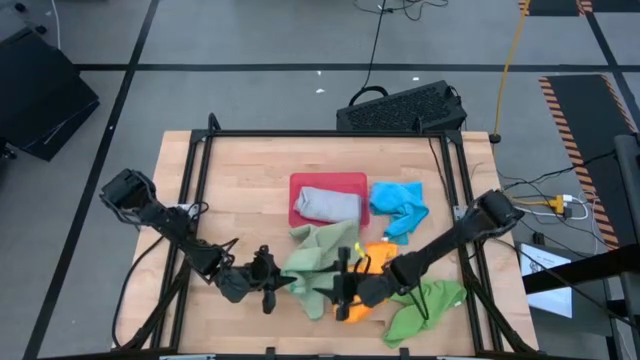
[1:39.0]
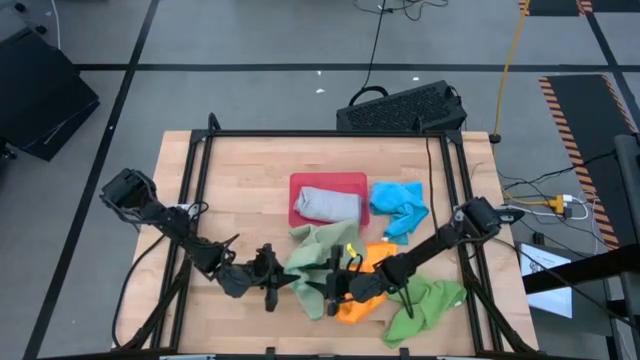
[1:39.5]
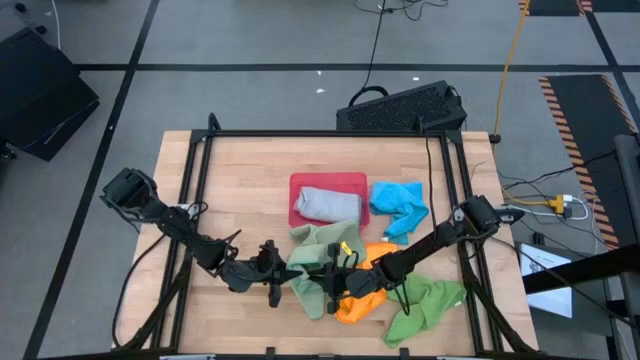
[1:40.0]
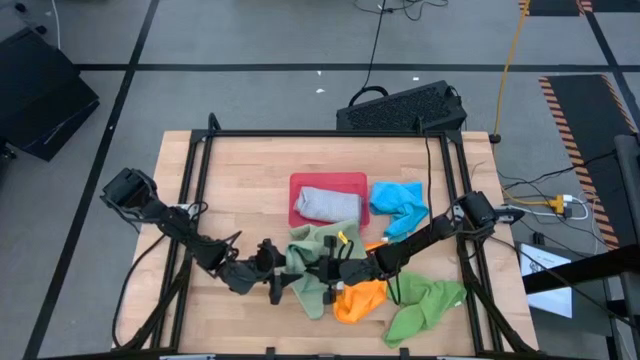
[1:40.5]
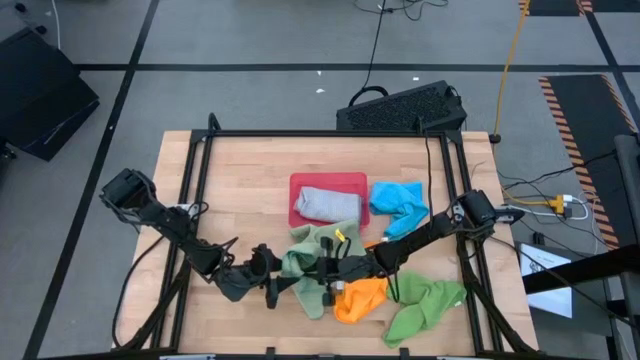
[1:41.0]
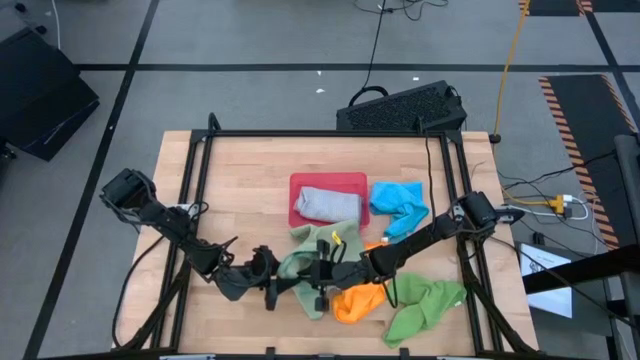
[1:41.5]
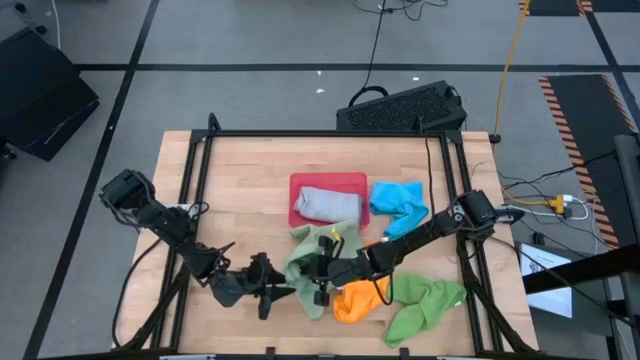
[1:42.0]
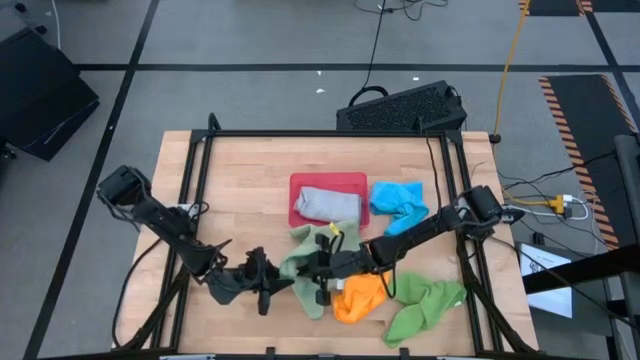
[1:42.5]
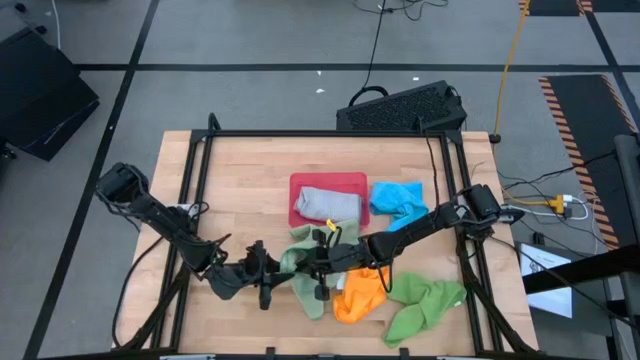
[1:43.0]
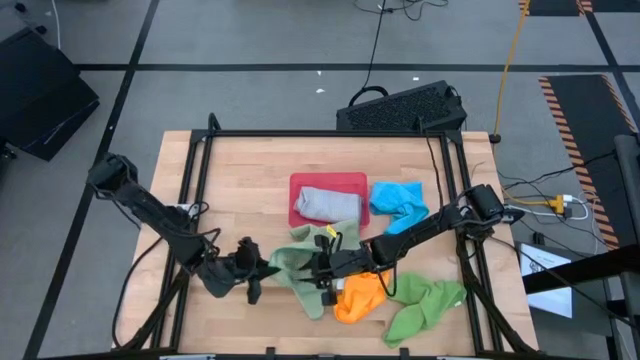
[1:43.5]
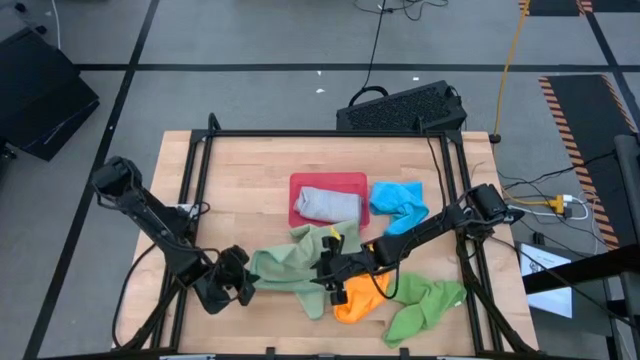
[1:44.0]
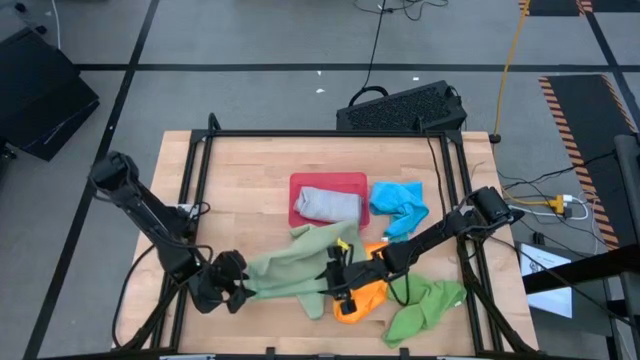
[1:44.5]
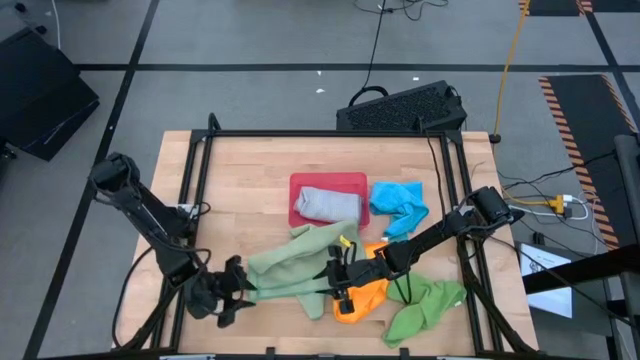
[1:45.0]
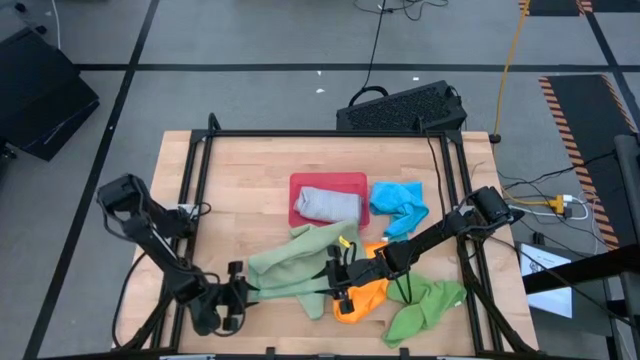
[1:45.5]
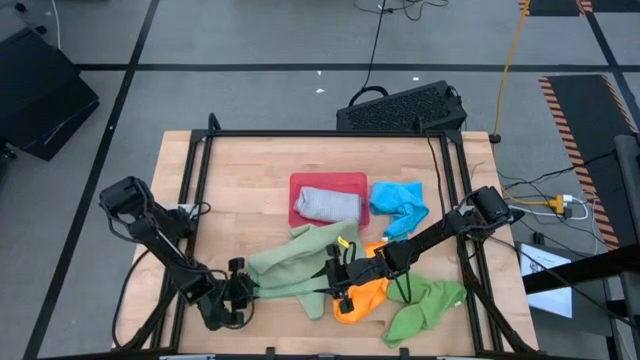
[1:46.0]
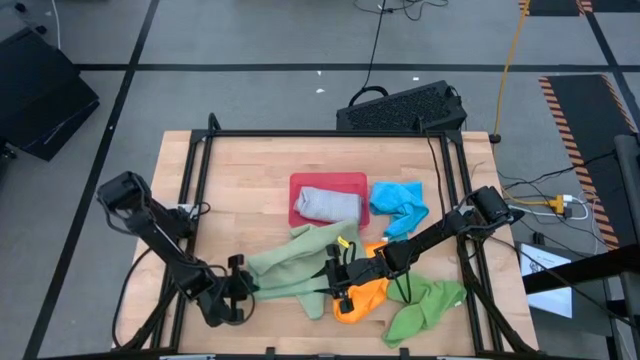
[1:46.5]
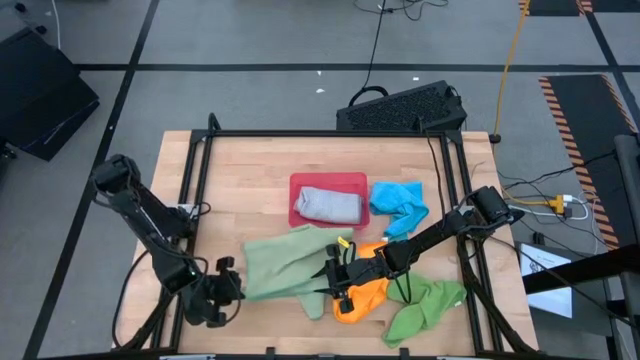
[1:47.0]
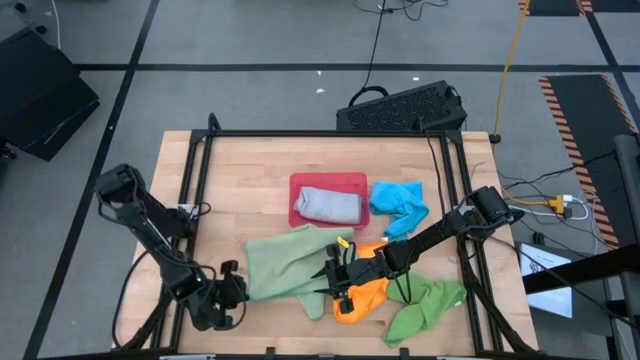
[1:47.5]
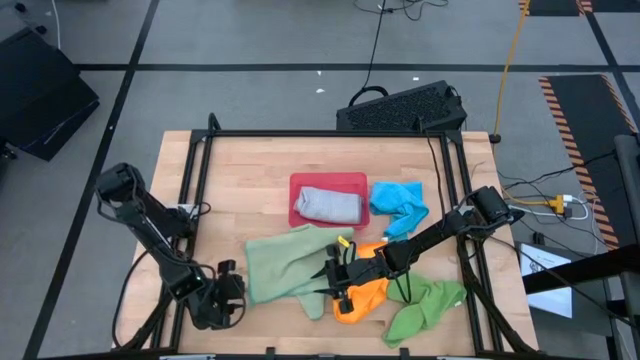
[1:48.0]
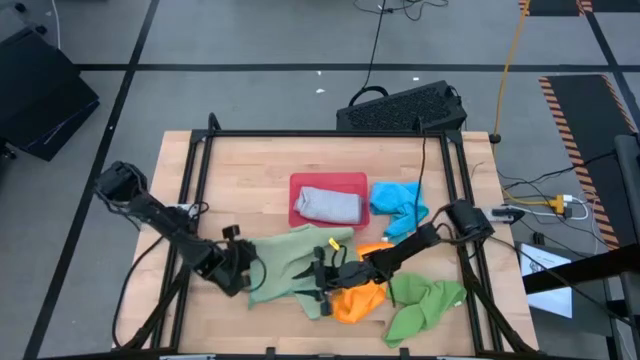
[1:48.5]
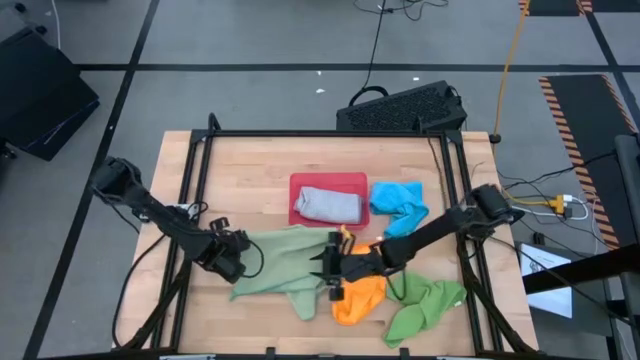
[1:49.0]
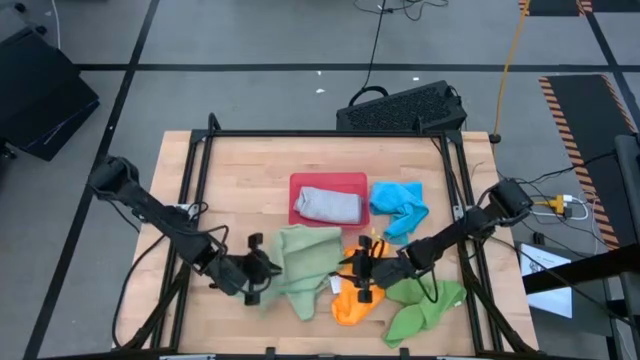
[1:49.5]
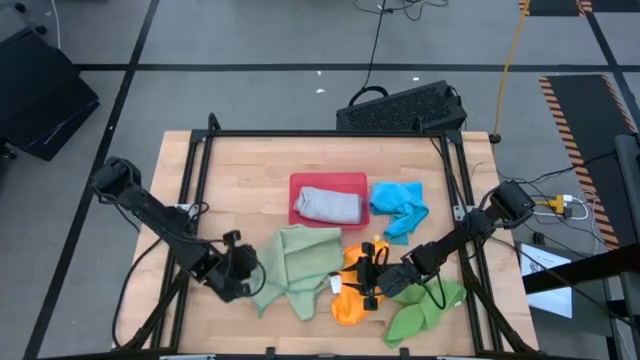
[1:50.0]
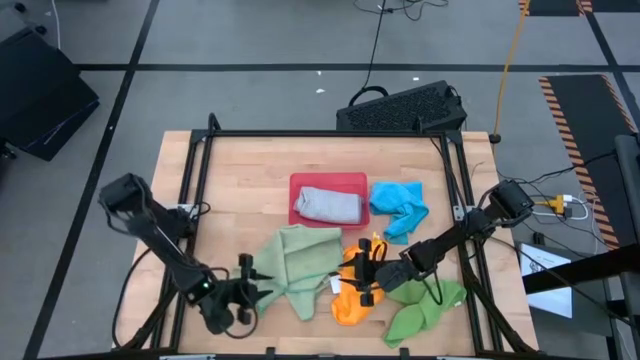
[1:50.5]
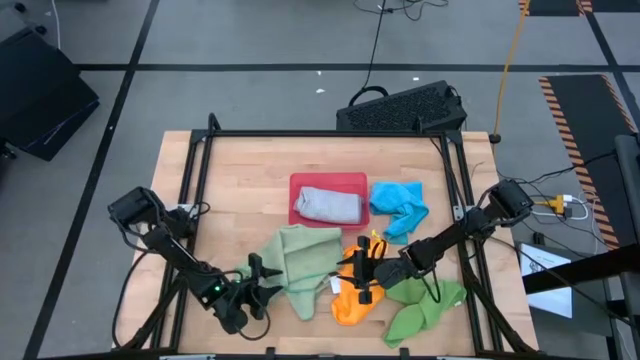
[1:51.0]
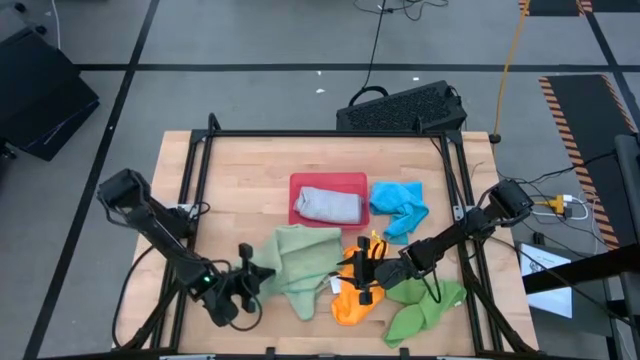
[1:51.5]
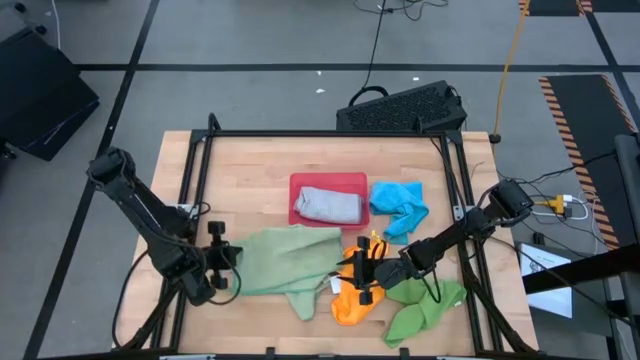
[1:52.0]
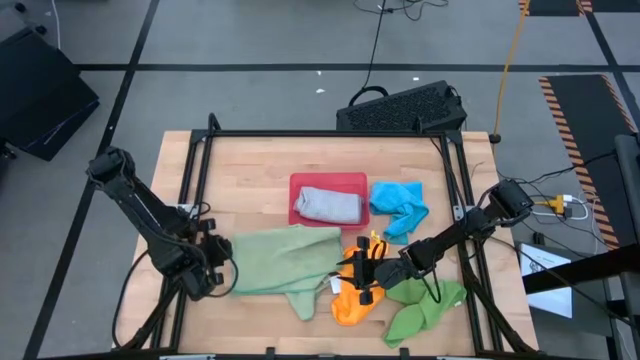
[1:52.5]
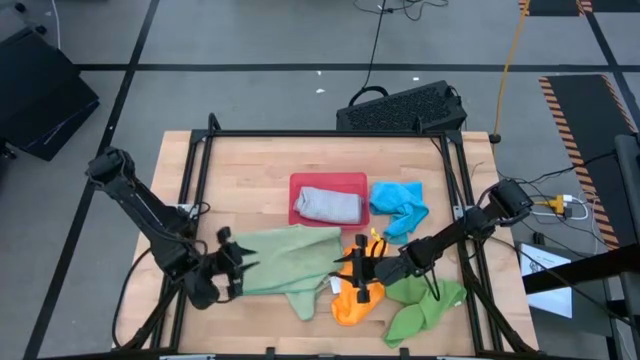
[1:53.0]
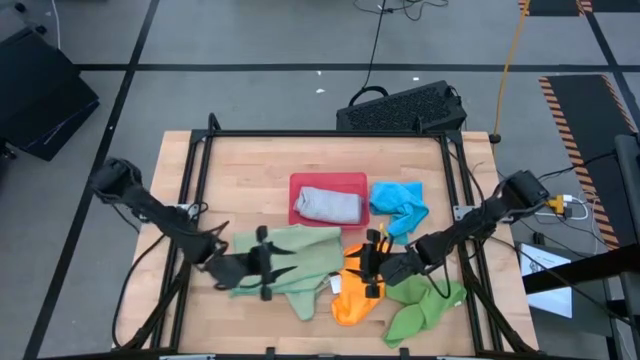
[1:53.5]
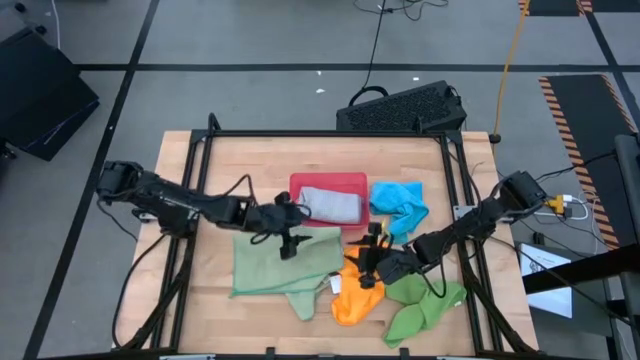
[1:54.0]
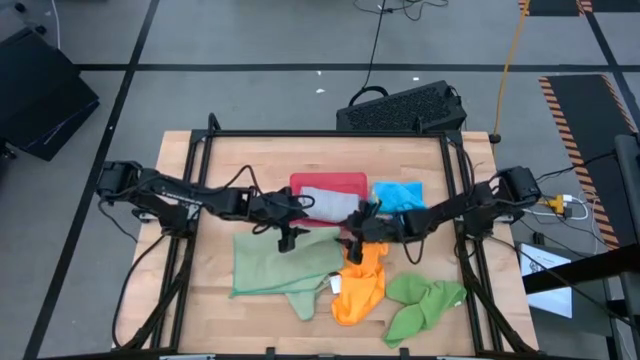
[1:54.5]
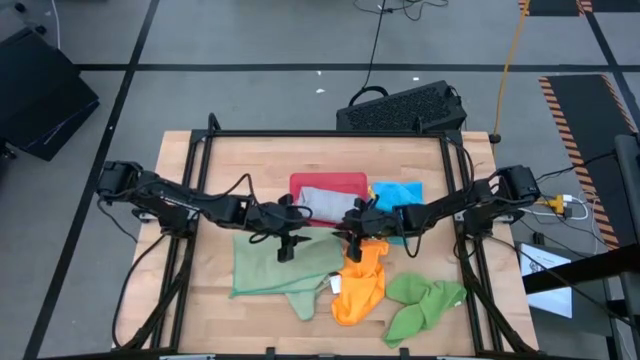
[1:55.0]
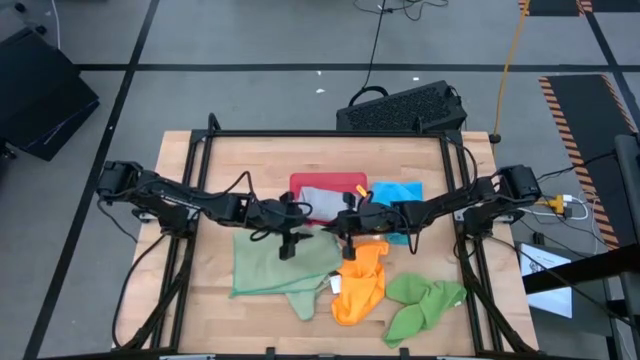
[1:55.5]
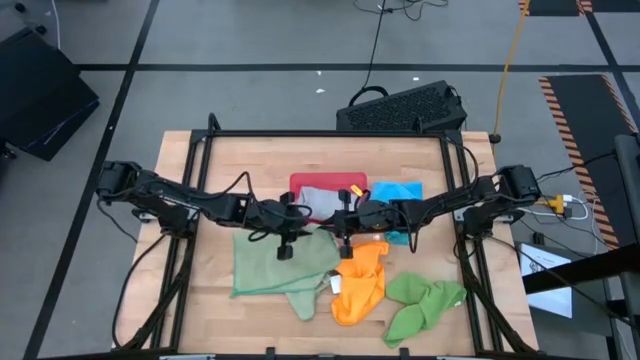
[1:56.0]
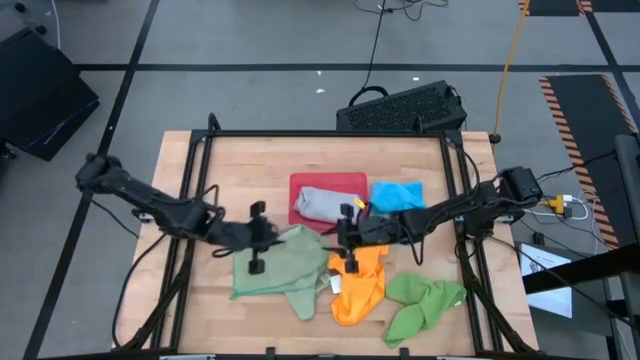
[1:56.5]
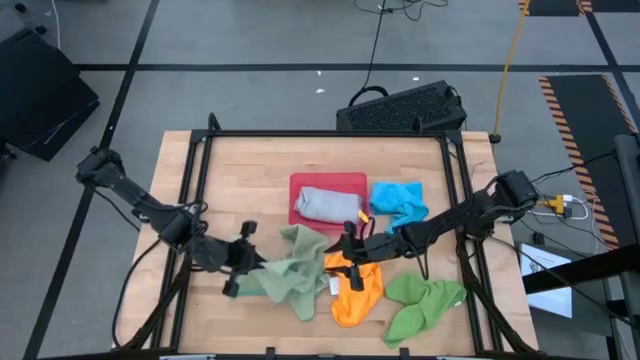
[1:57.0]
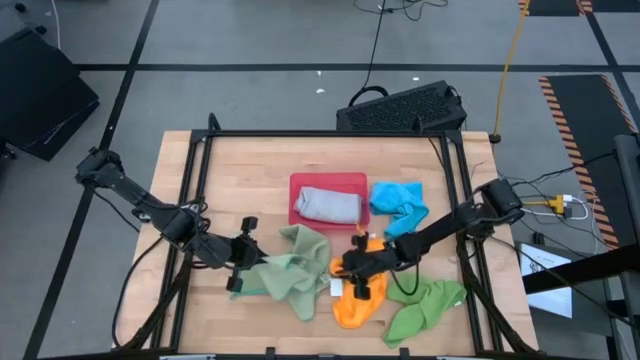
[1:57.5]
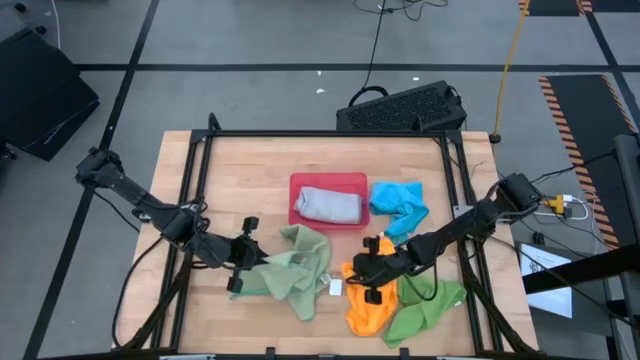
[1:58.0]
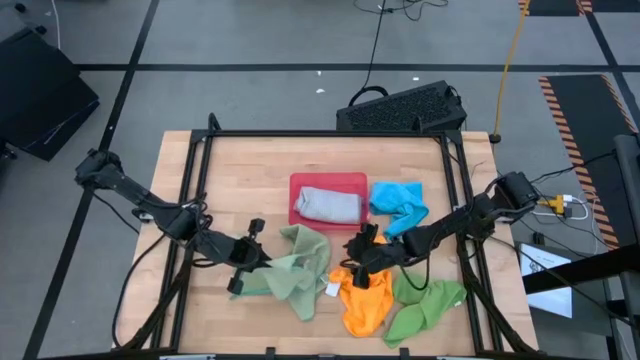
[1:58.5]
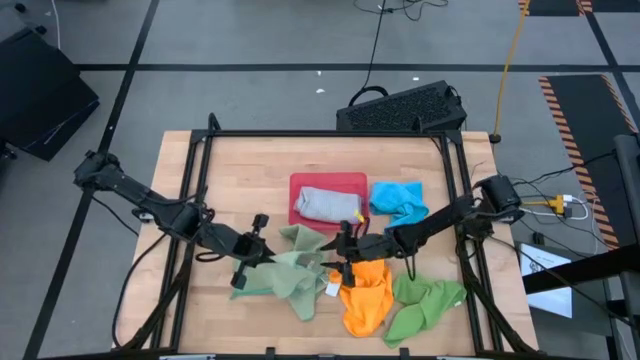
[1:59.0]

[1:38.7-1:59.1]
Task: Fold microfiber towels
Fold the light green microfiber cloth

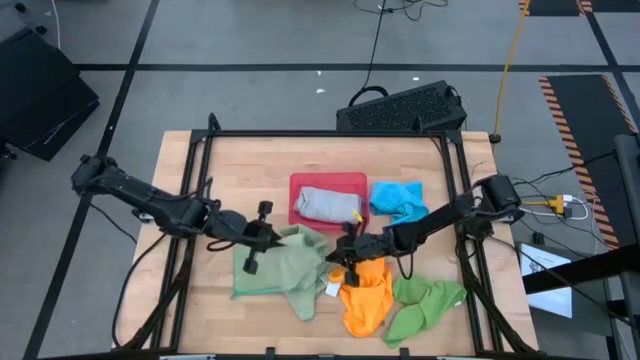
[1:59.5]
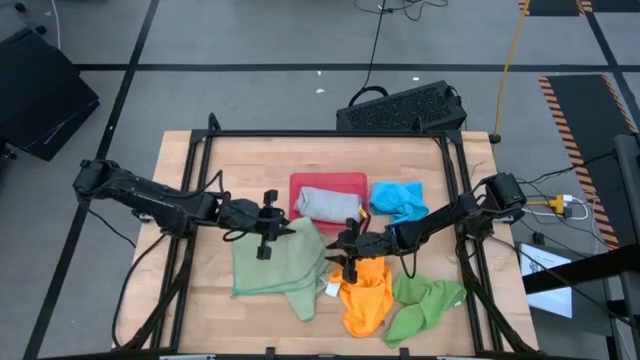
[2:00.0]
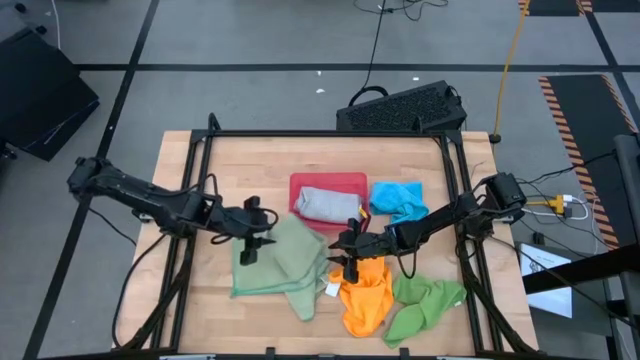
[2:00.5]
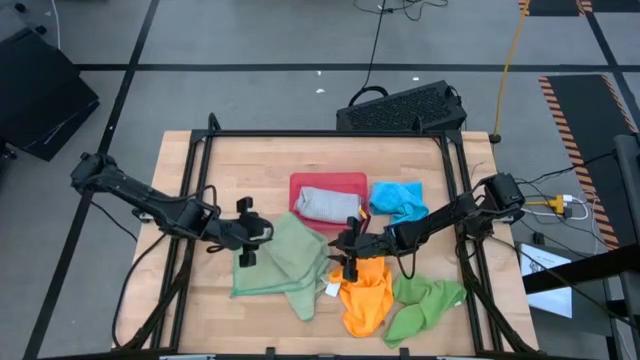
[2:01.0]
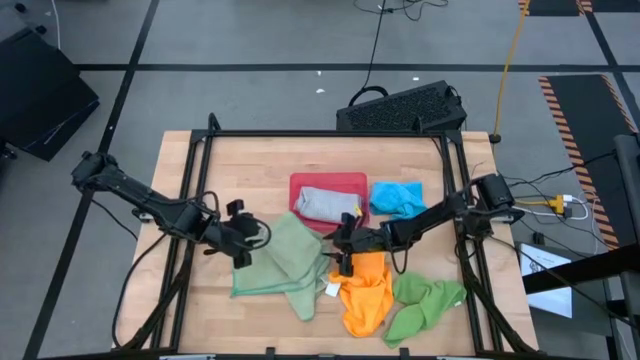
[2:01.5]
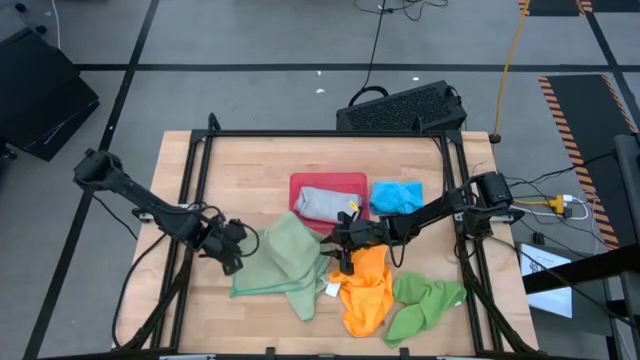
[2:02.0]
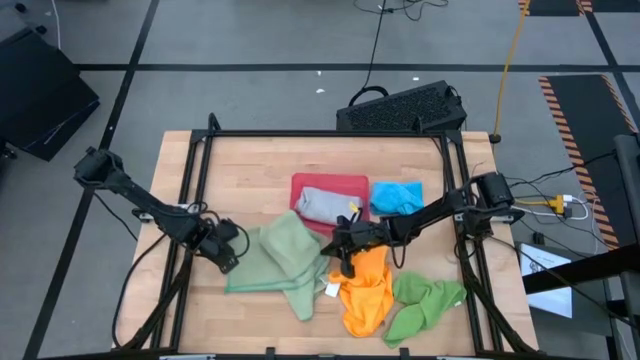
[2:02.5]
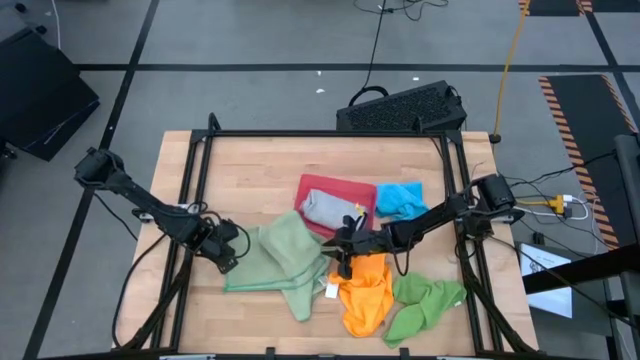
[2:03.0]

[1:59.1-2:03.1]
Fold the light green microfiber cloth
